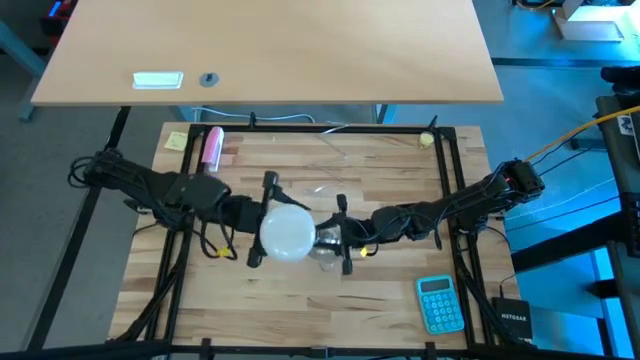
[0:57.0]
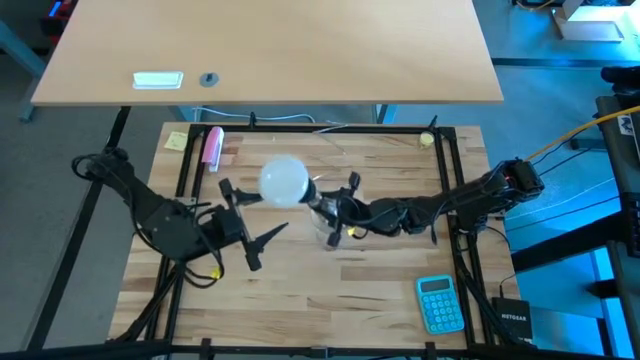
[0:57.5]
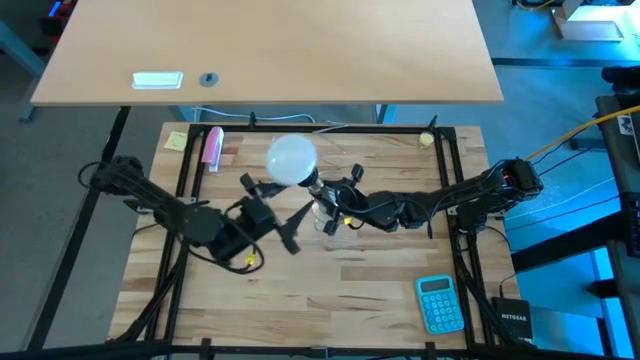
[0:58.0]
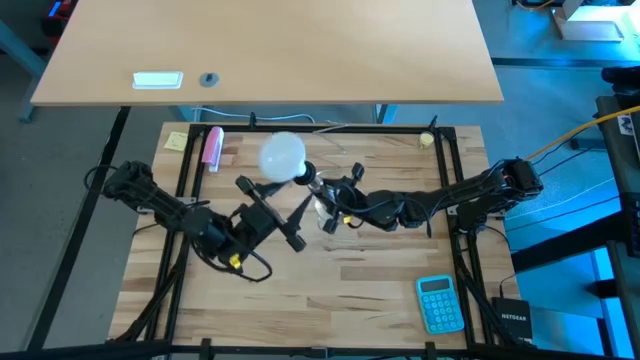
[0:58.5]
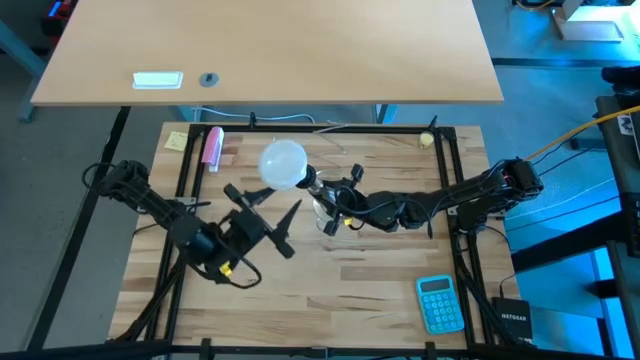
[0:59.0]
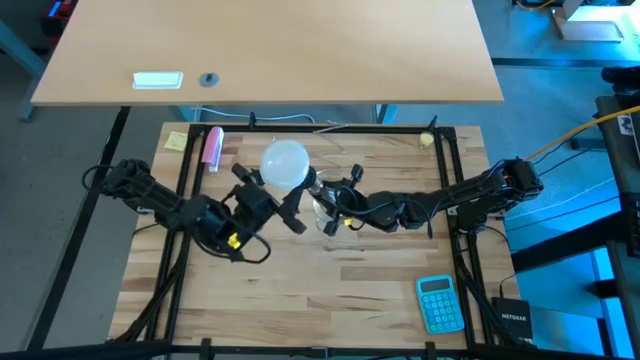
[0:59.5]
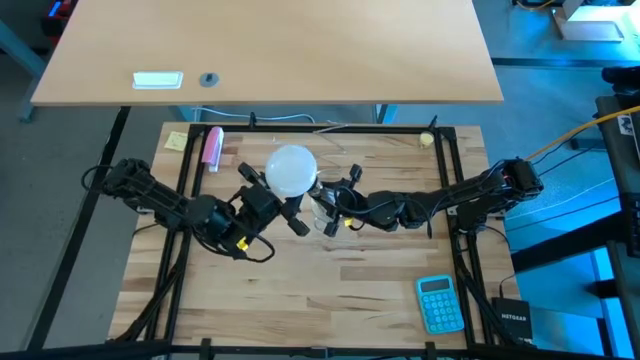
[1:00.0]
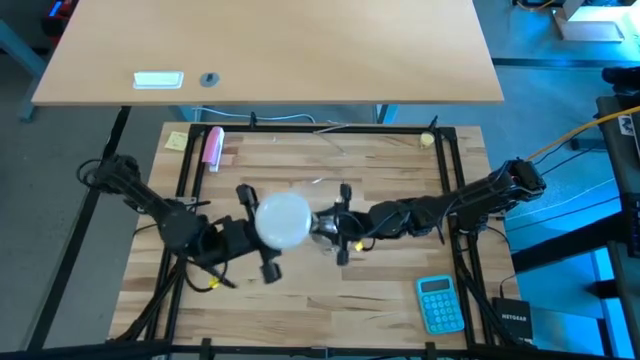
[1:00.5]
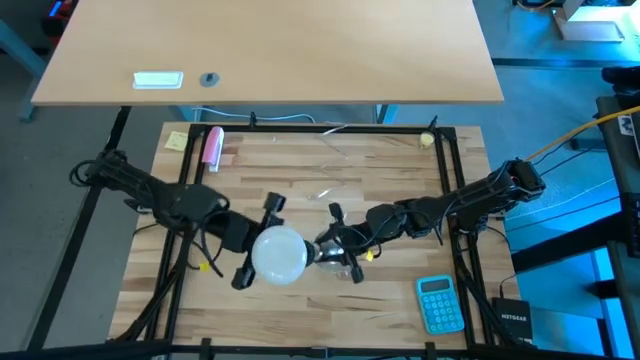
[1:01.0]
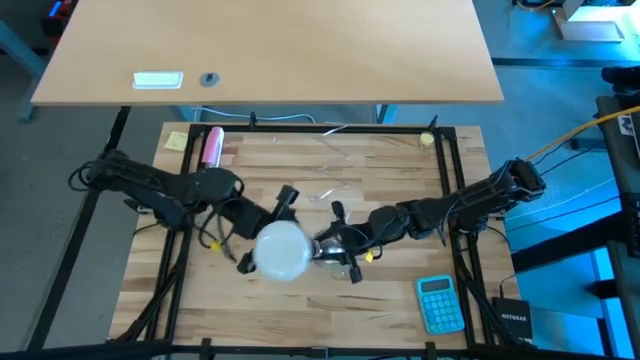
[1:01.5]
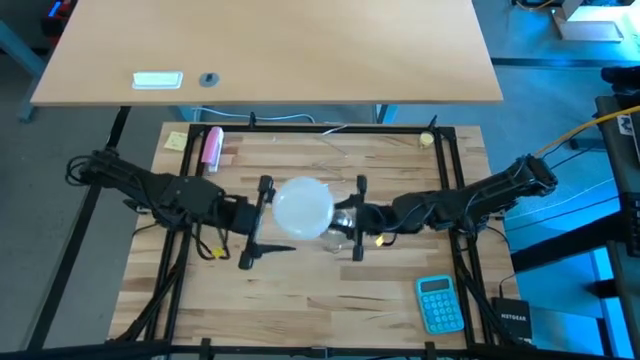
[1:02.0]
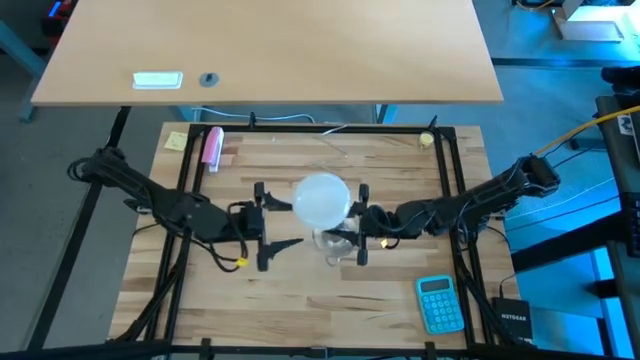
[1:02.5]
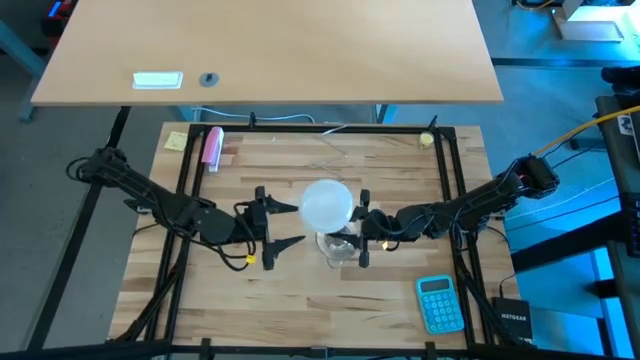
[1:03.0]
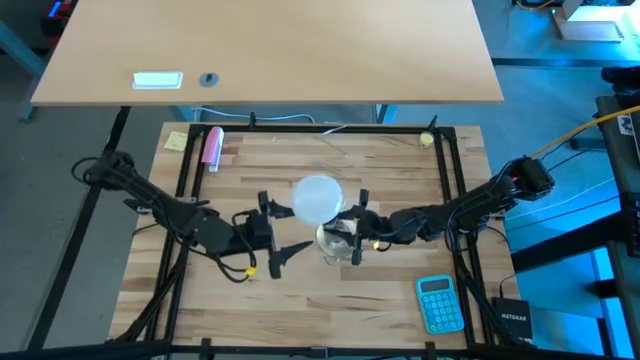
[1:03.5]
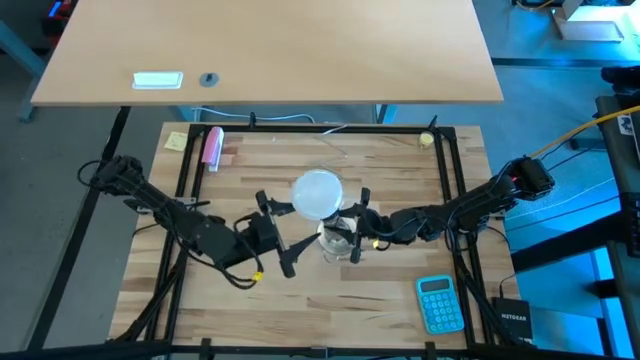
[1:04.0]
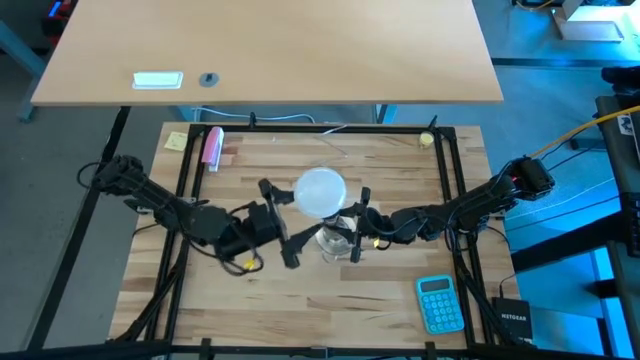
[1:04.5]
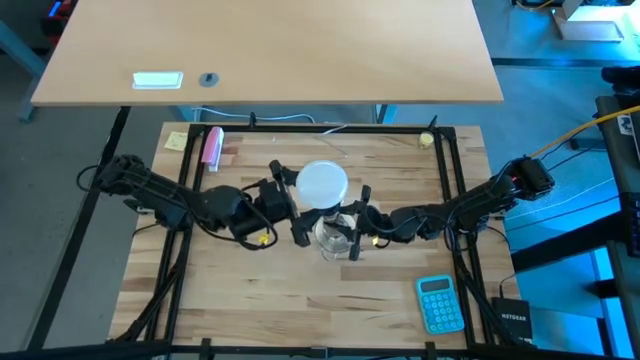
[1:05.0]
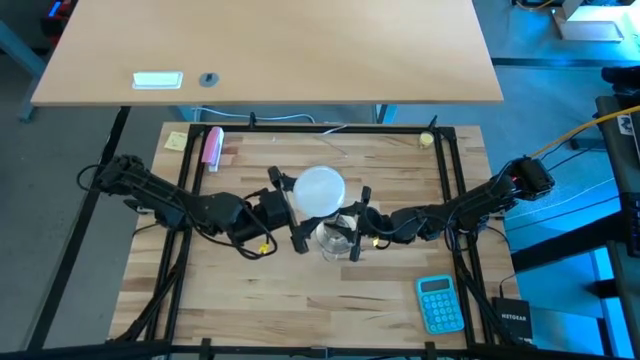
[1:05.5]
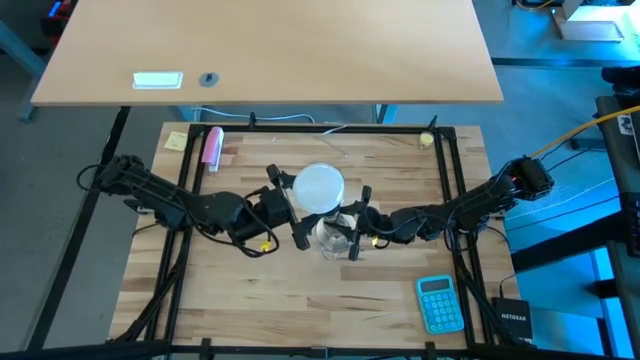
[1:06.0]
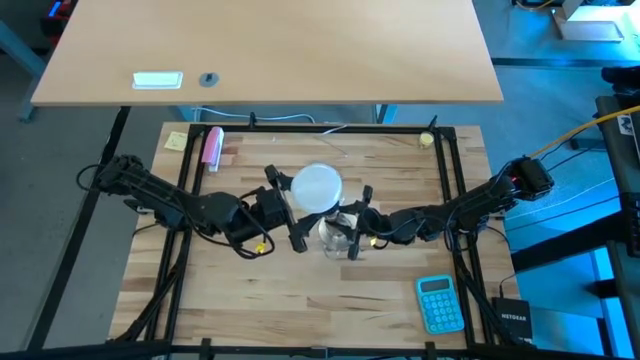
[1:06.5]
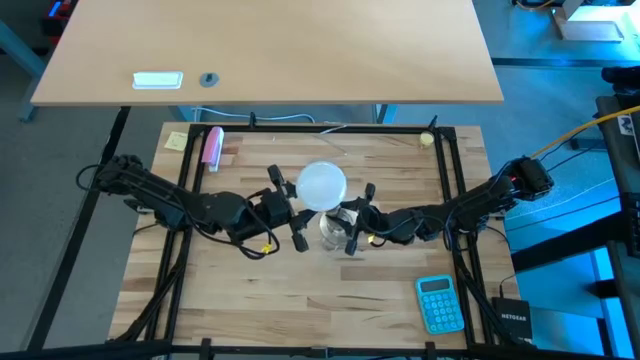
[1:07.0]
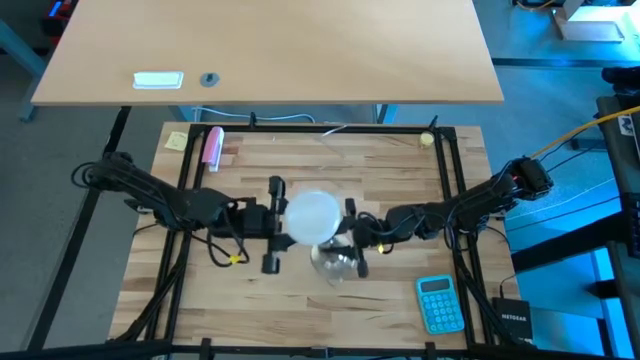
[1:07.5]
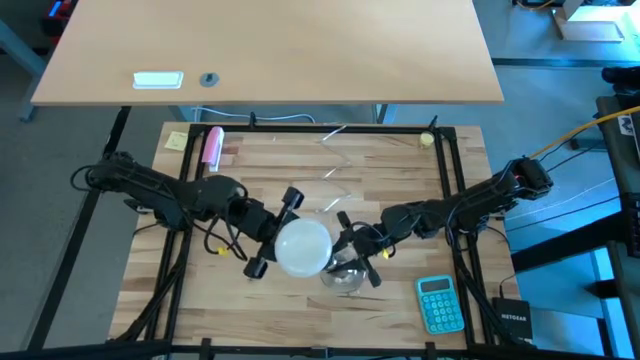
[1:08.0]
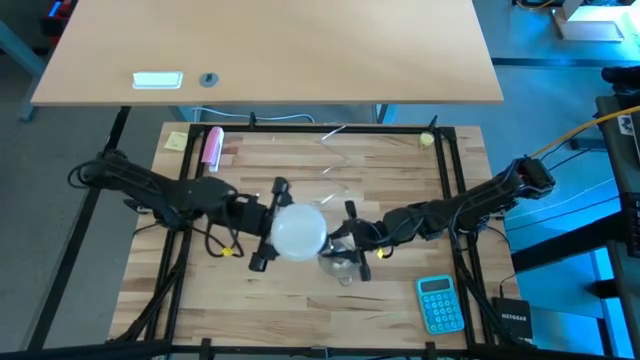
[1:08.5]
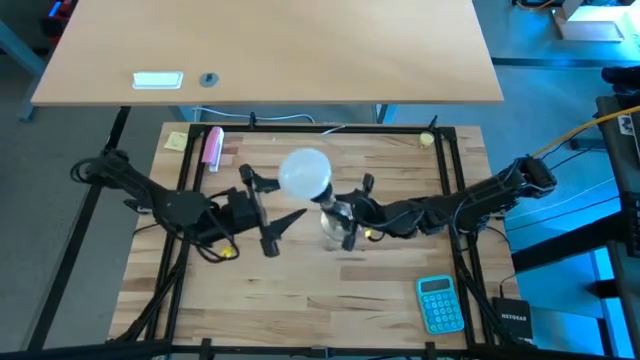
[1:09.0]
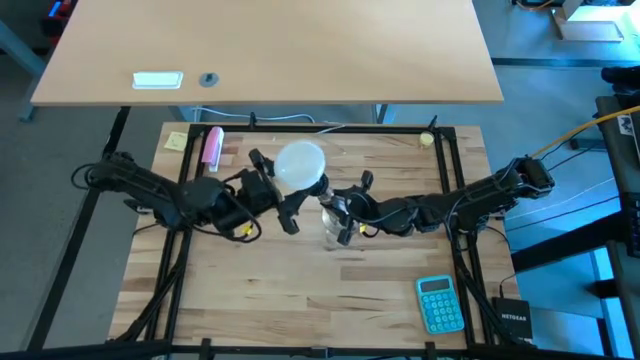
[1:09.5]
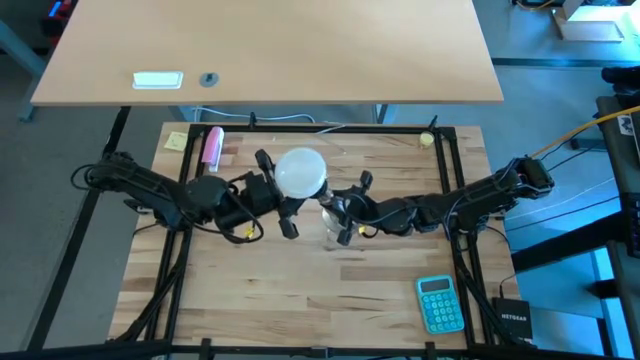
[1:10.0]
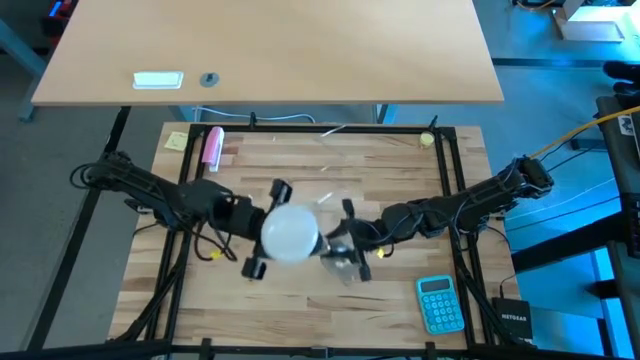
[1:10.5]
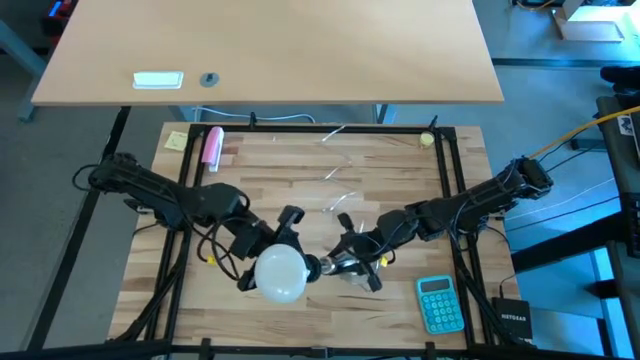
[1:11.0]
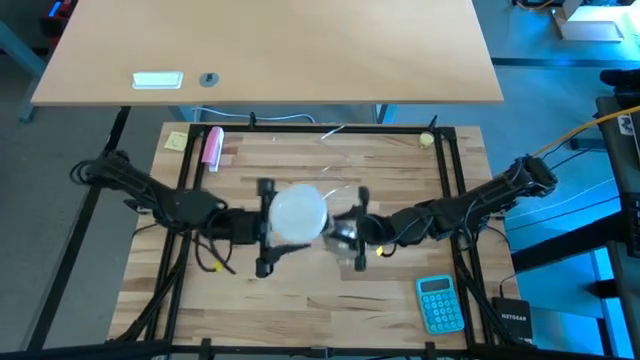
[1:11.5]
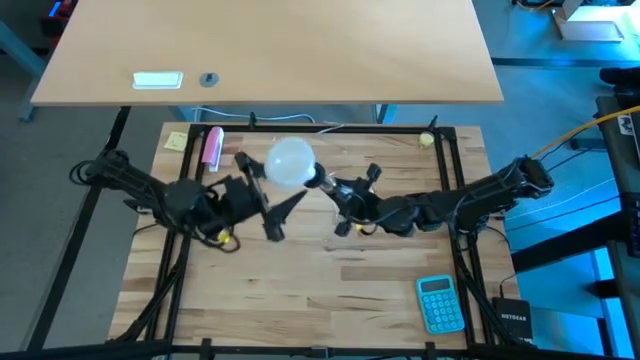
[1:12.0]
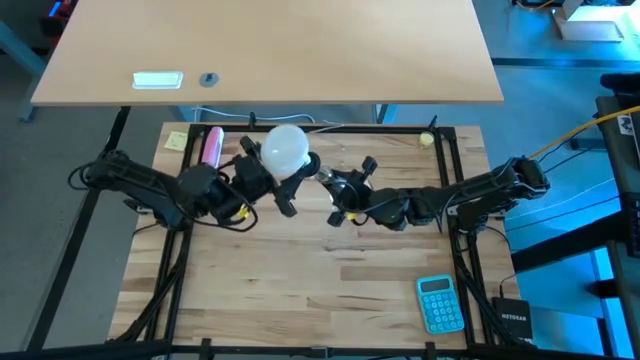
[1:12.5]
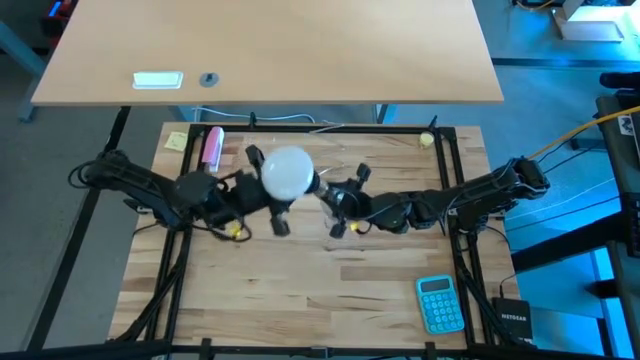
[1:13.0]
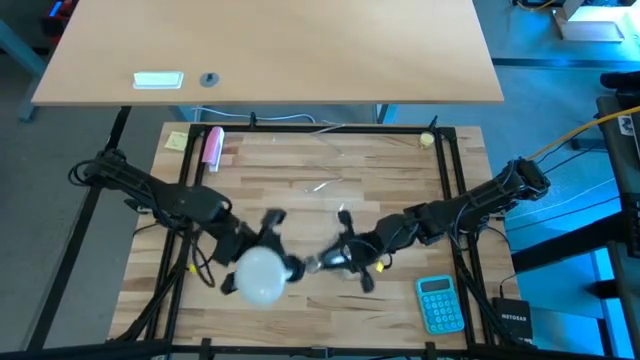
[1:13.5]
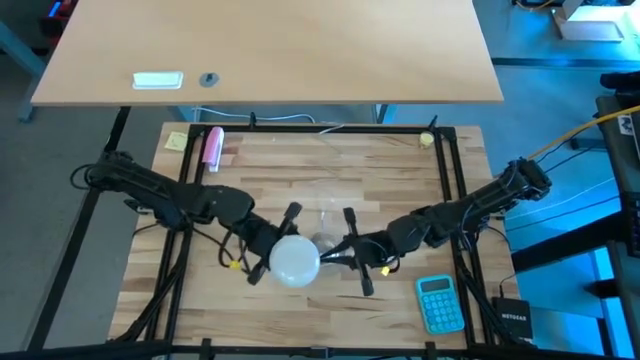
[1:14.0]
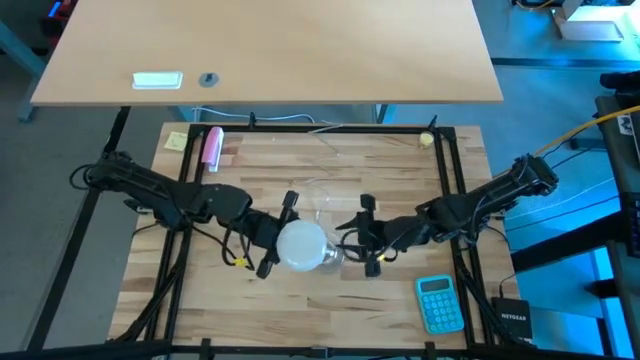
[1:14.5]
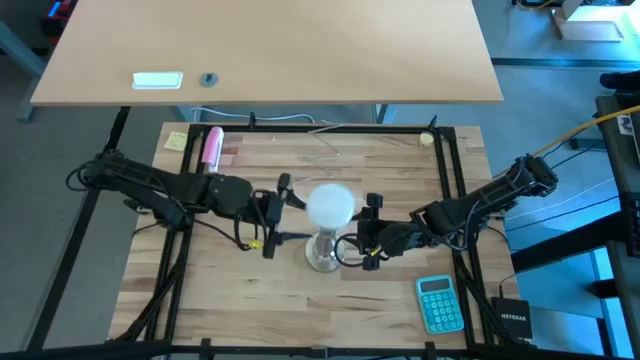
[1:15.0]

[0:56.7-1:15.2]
Task: Screw lightbulb
Insert the light bulb into the lamp

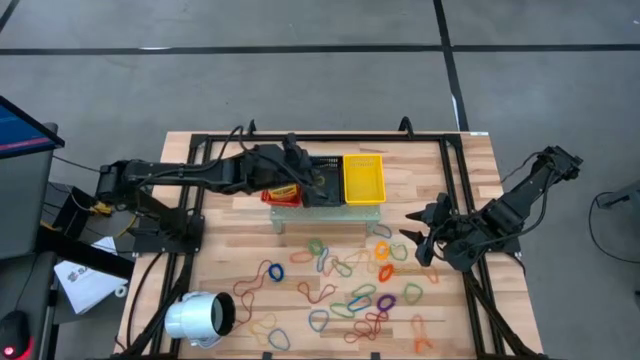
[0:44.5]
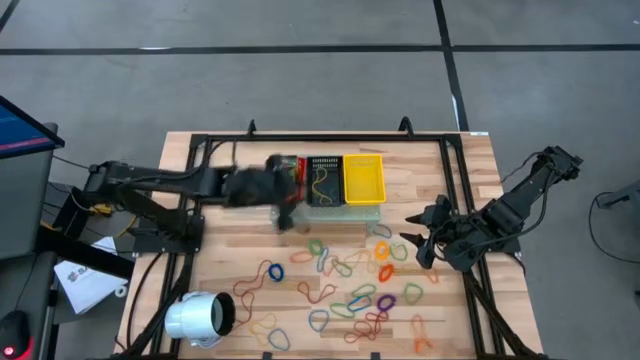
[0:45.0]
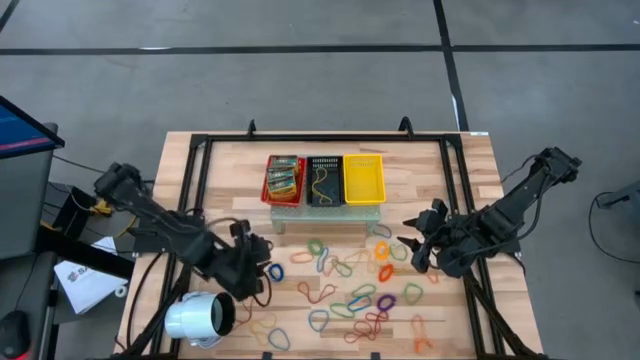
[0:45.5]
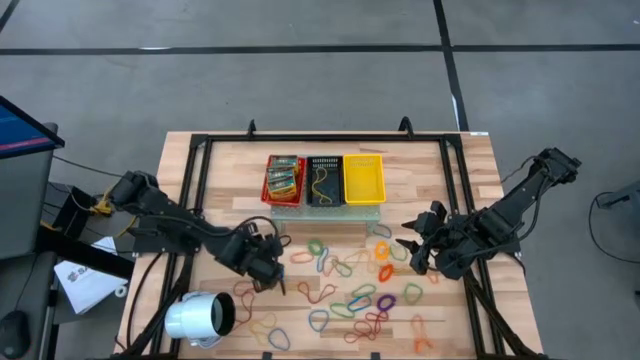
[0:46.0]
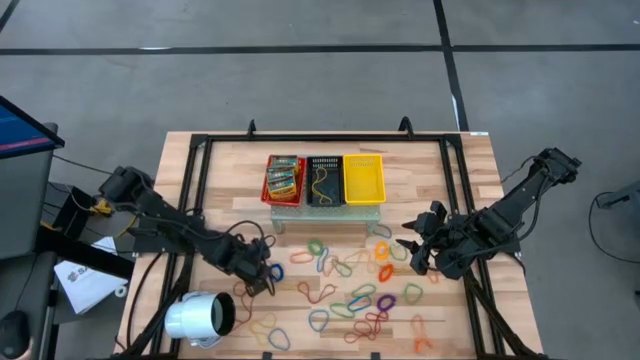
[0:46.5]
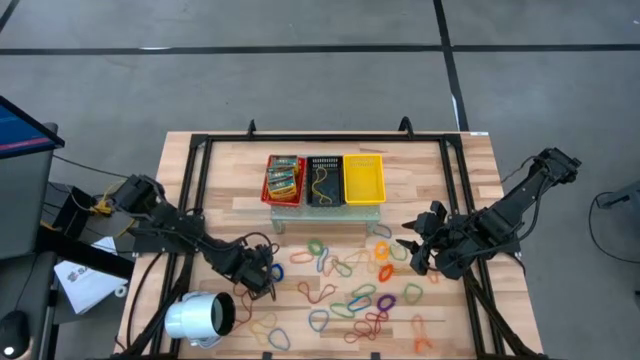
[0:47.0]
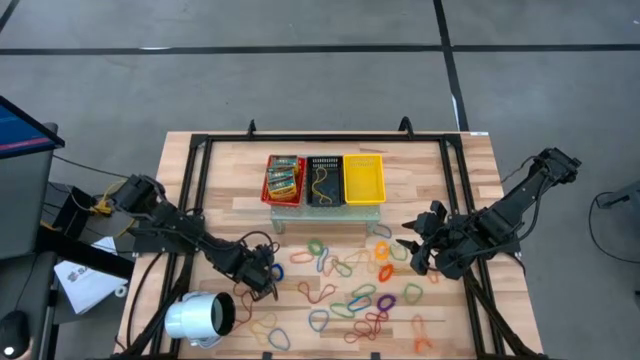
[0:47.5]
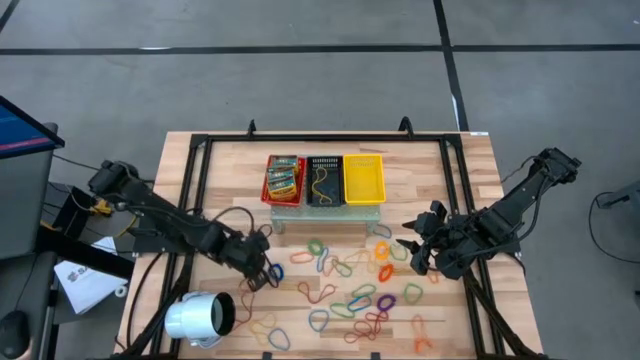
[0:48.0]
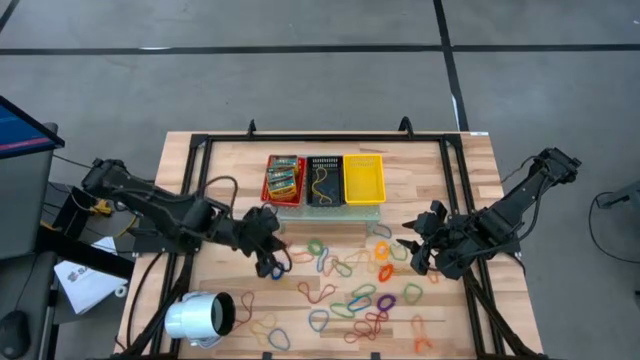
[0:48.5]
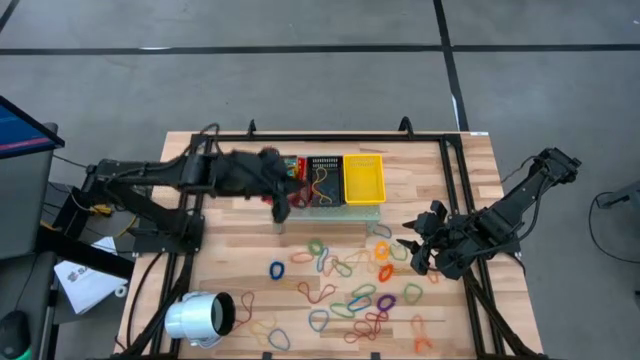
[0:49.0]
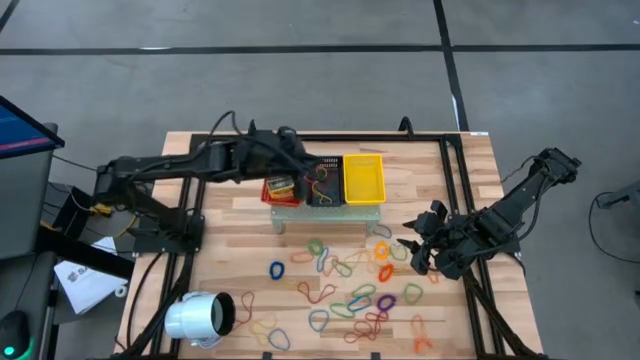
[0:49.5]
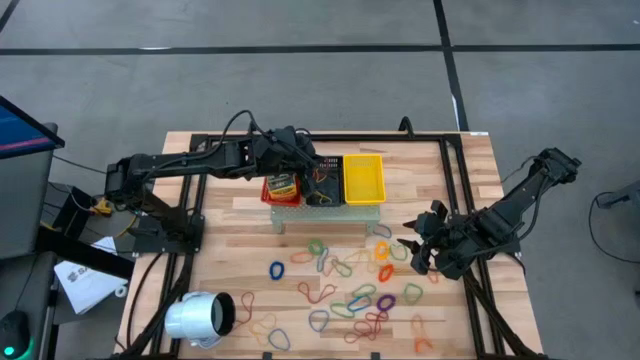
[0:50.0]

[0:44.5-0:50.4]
Task: Pick & Place Office Desk Supplies
Put the red rubber band into the black bin on the shelf
